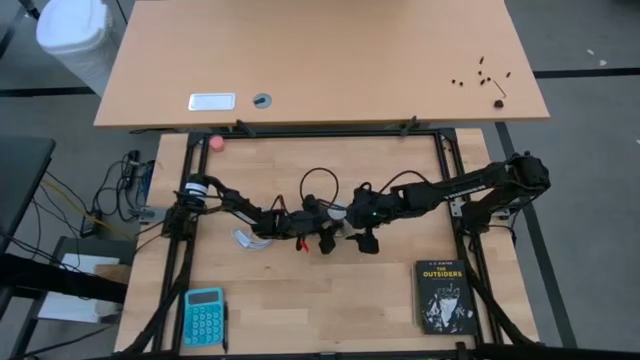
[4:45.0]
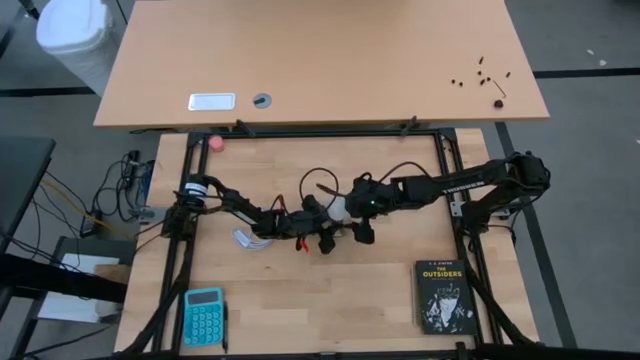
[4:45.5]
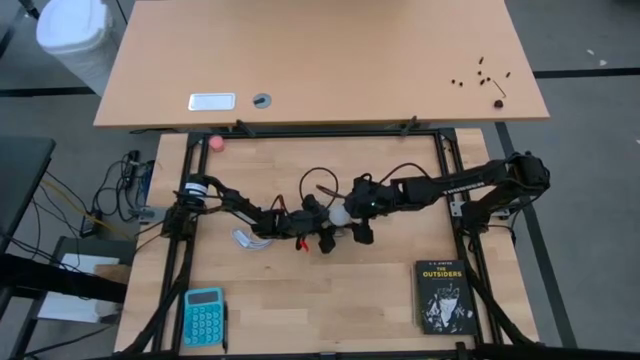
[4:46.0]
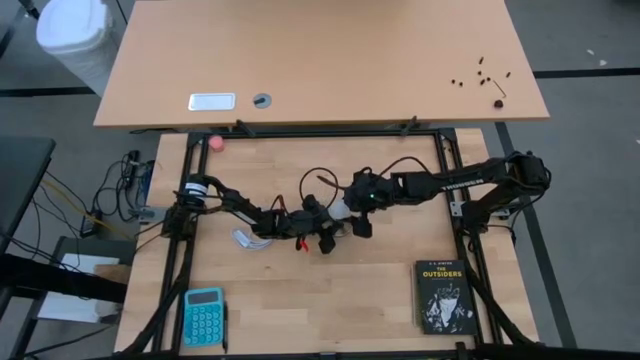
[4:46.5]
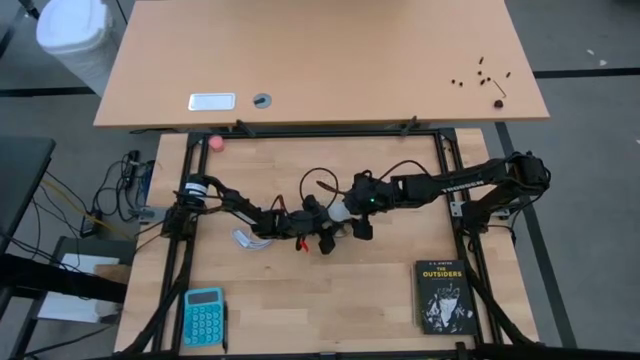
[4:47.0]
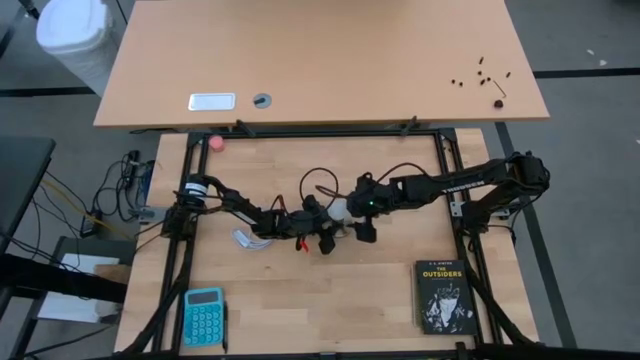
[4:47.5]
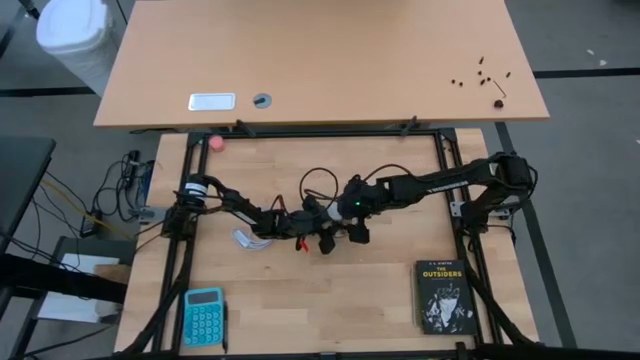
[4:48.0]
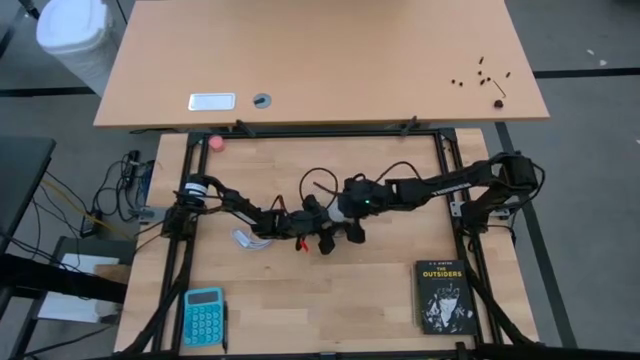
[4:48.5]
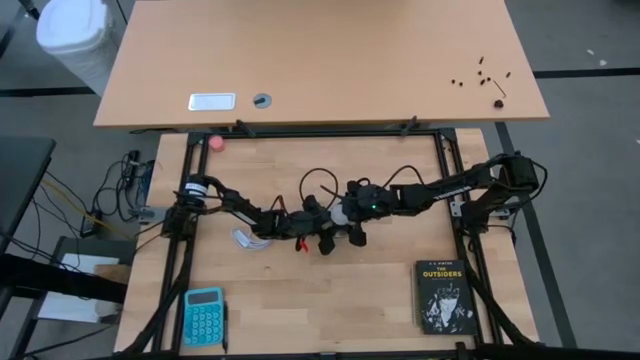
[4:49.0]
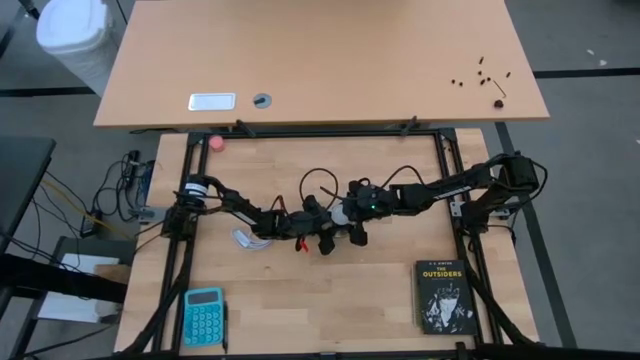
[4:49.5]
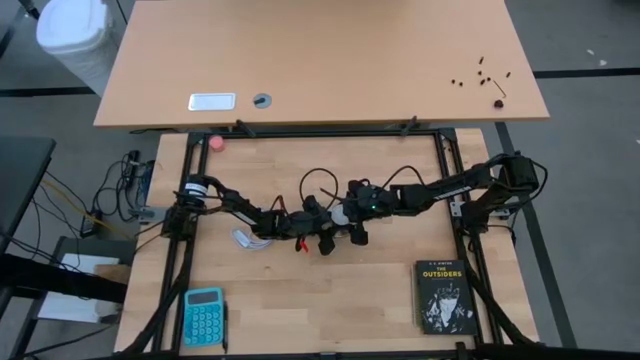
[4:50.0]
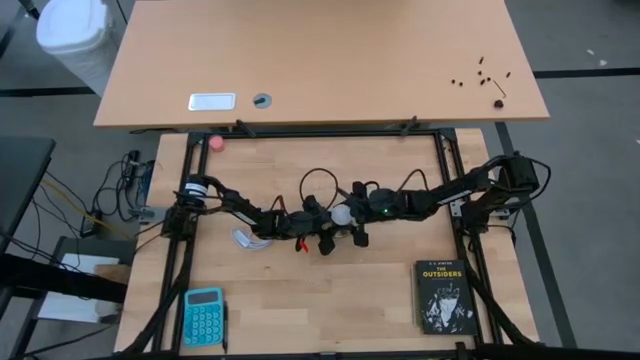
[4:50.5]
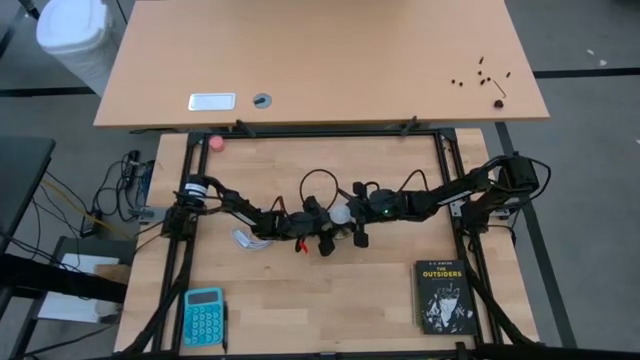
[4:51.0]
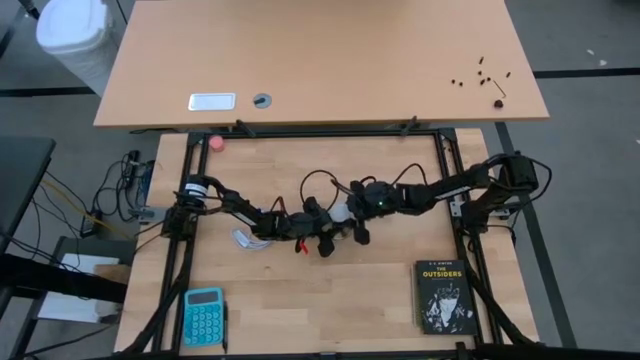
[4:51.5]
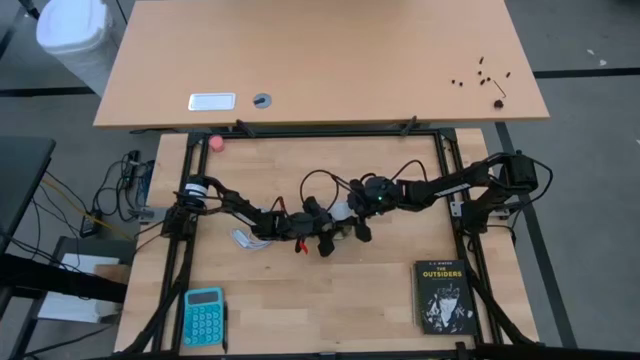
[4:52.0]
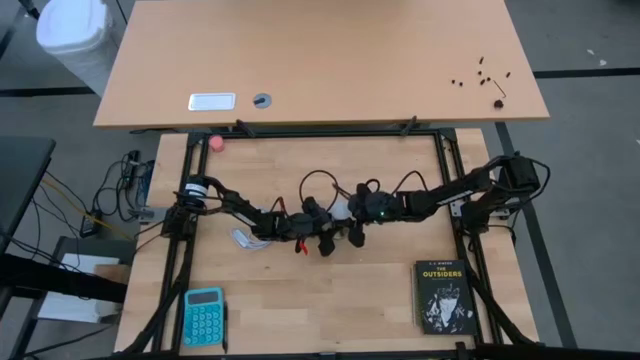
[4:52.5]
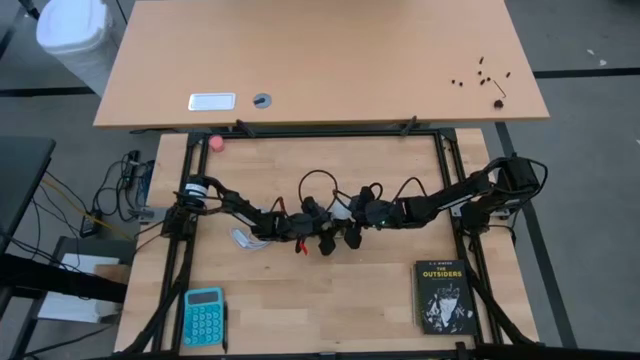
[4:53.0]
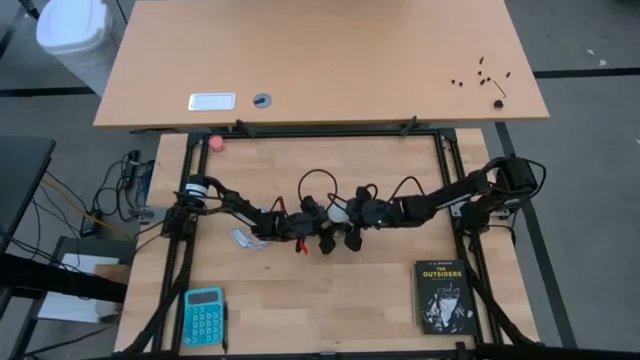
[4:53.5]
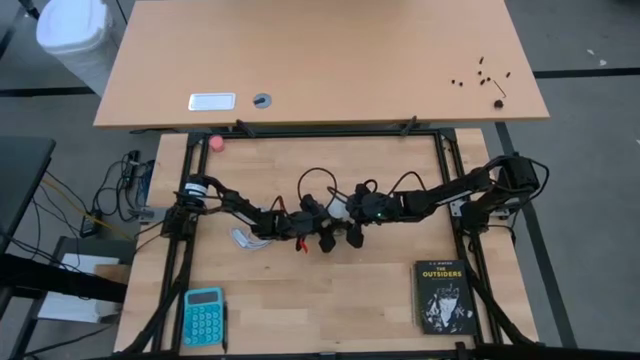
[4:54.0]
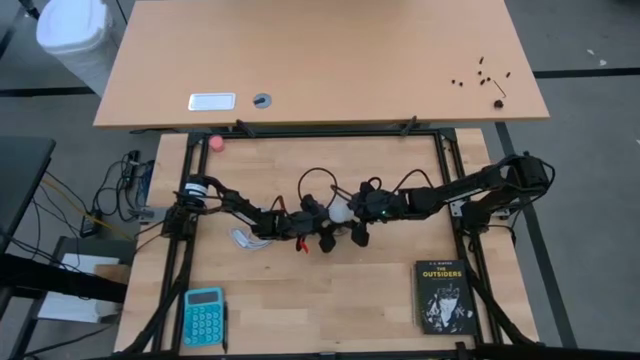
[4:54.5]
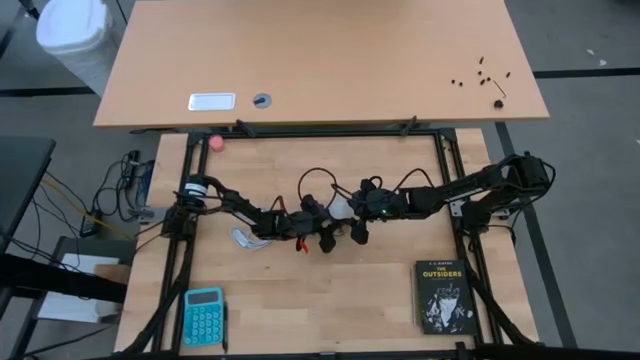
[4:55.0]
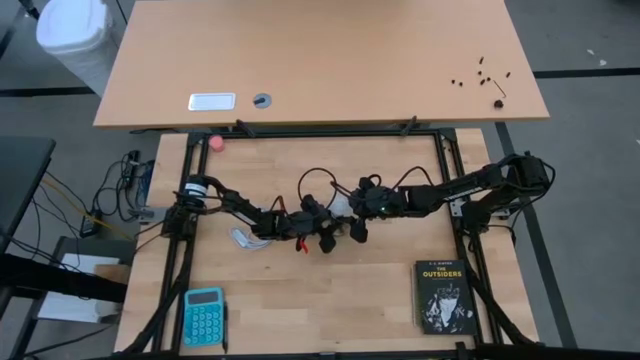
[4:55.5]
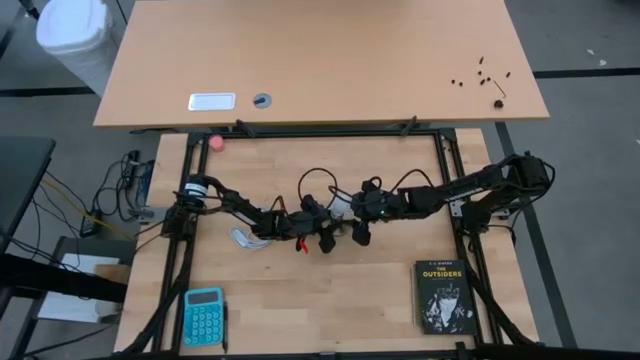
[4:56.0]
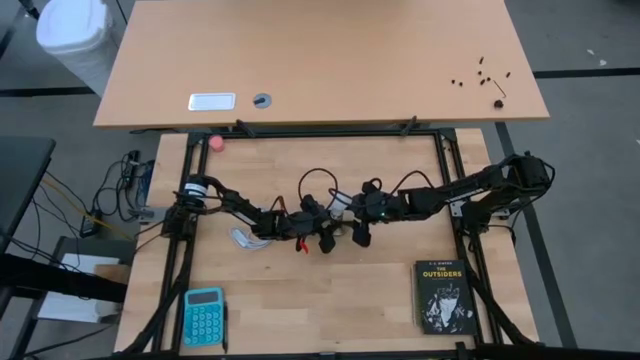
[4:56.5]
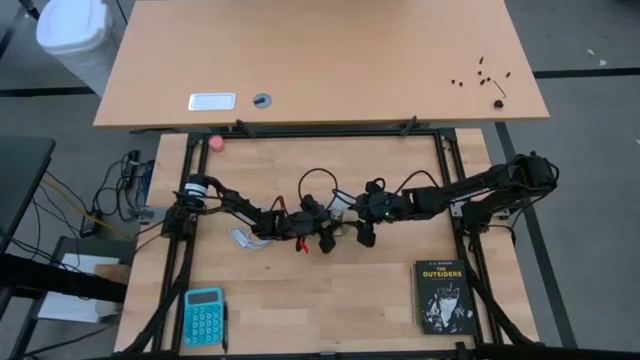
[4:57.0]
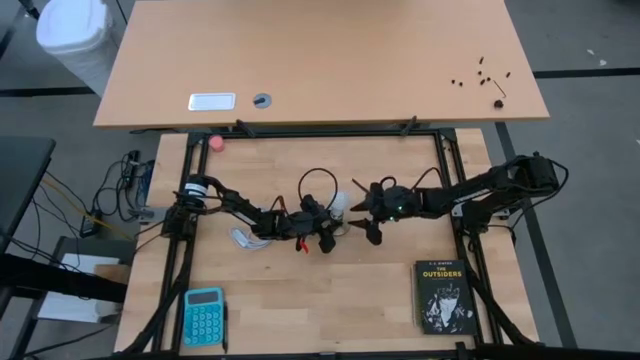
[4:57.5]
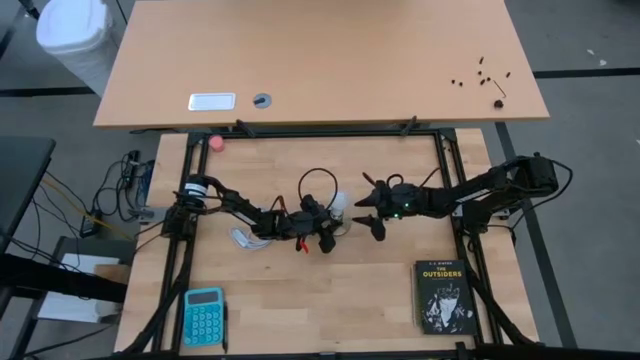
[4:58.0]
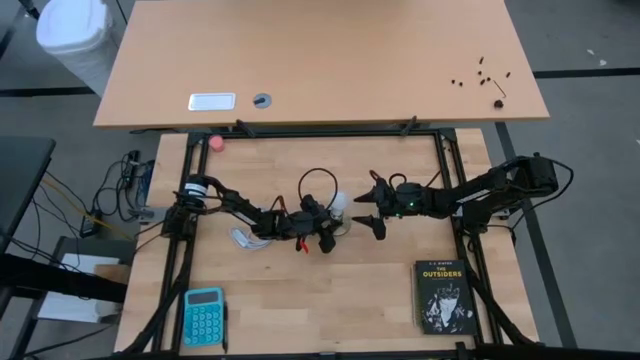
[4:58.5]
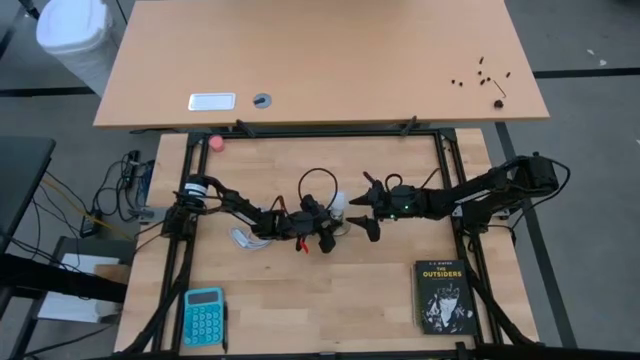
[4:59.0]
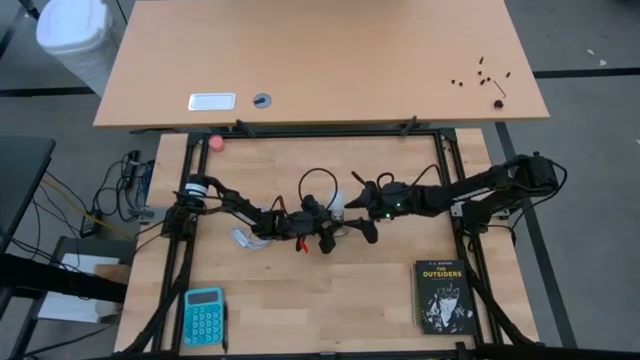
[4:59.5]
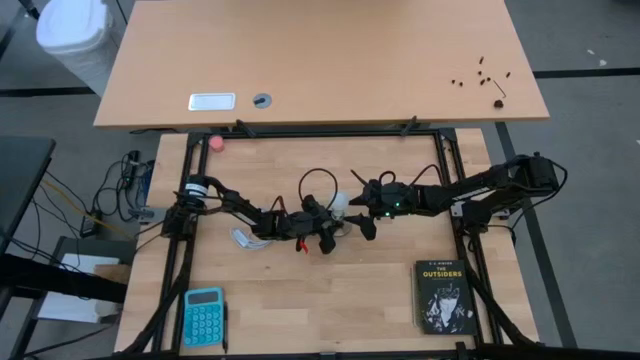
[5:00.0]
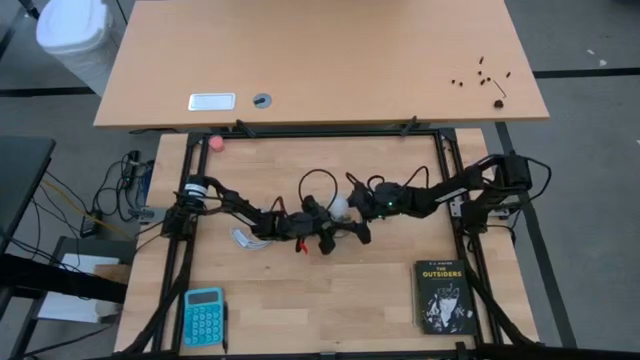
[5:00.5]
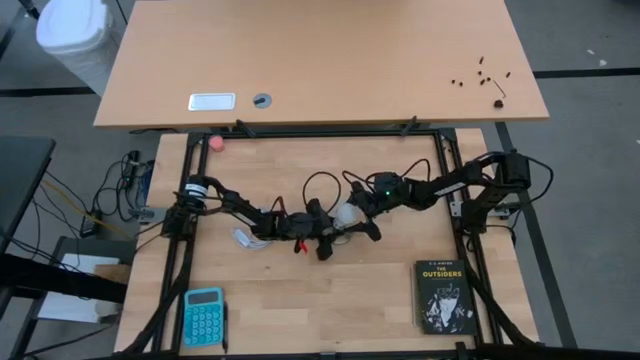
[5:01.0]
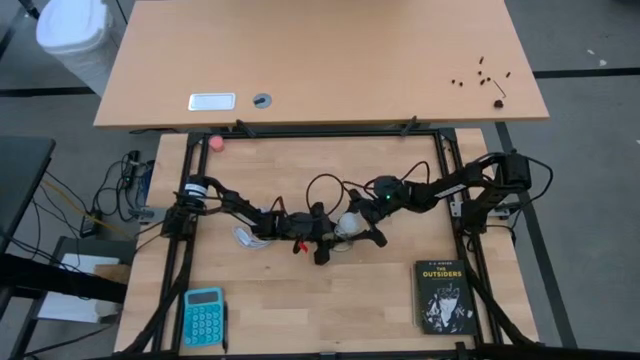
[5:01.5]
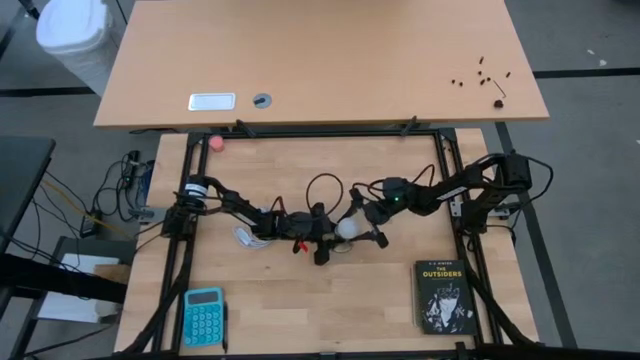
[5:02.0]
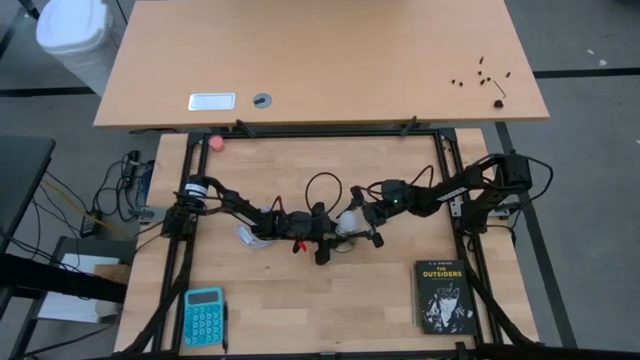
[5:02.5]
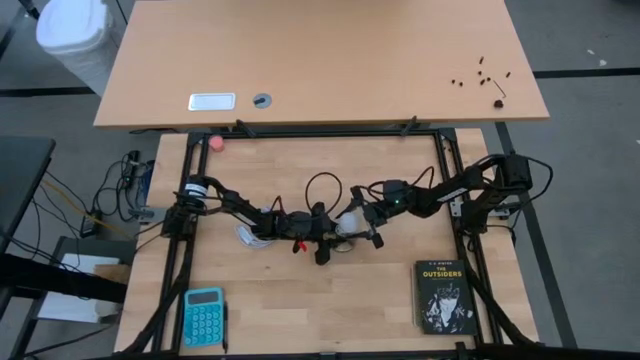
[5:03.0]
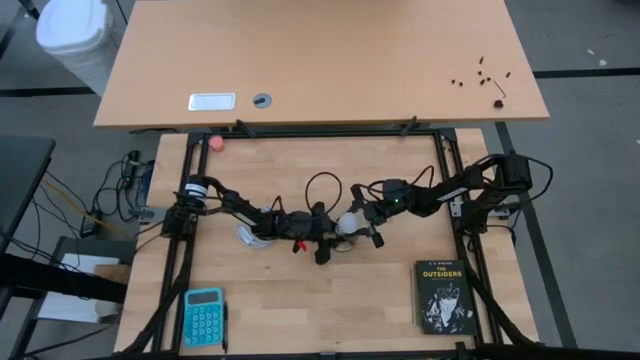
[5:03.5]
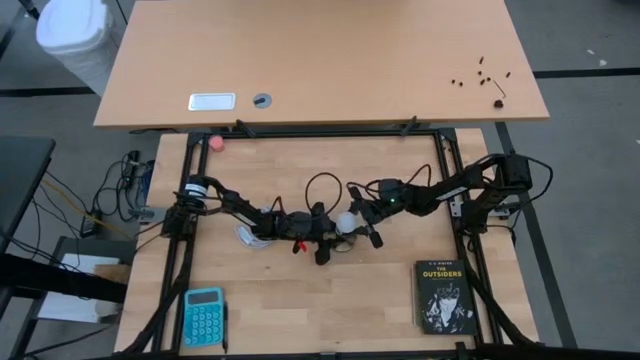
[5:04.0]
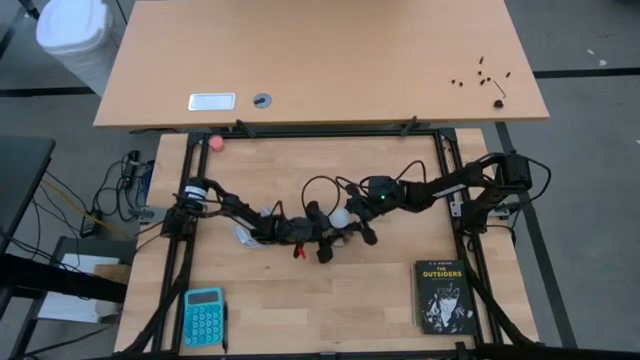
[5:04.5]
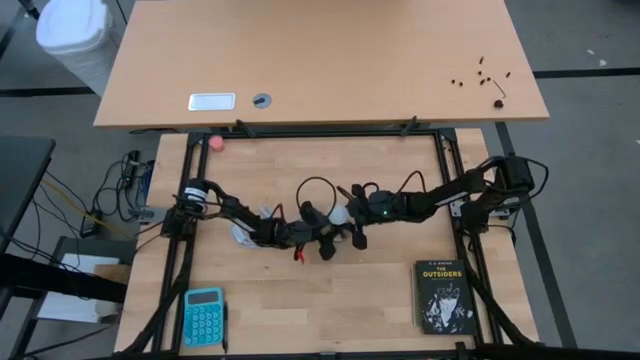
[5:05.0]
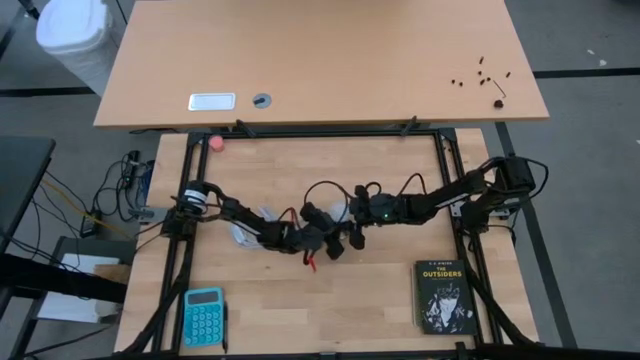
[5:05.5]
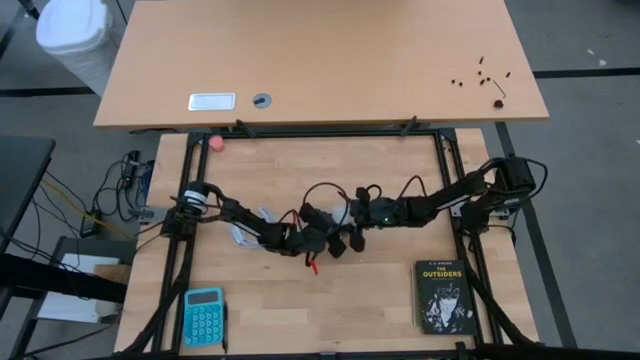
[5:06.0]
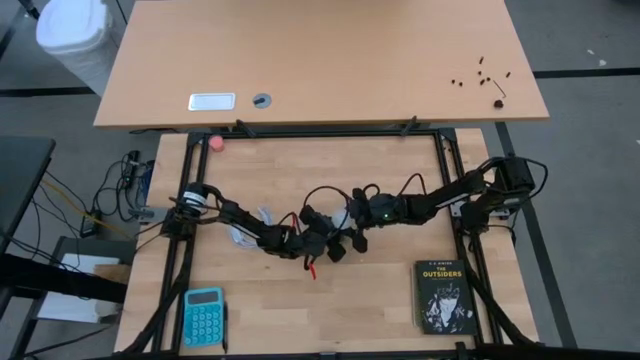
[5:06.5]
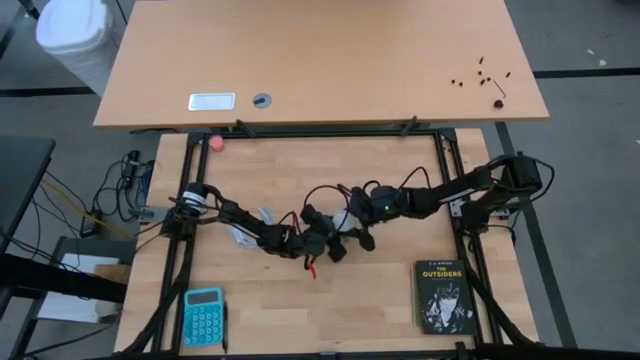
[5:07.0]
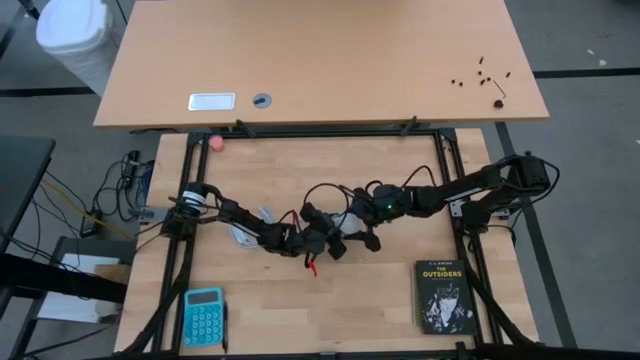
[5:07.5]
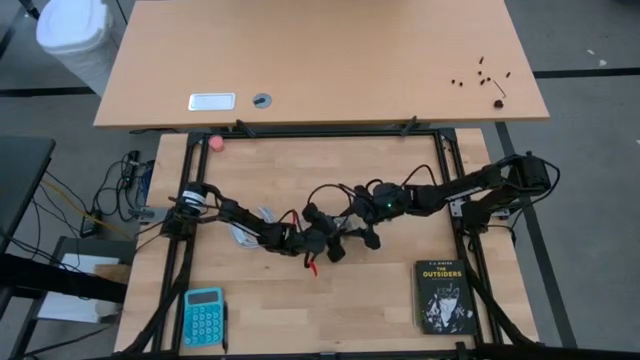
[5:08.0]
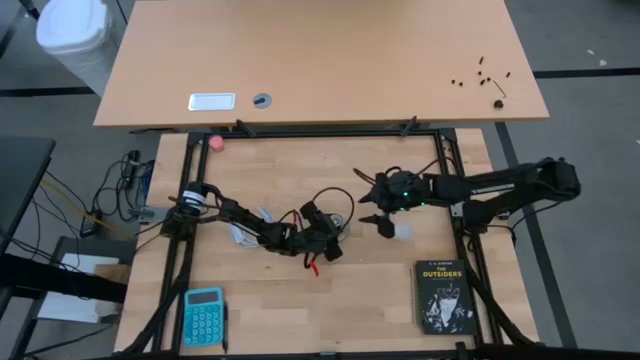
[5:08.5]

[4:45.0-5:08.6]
Task: Screw lightbulb
Insert the white lightbulb into the silver lamp
